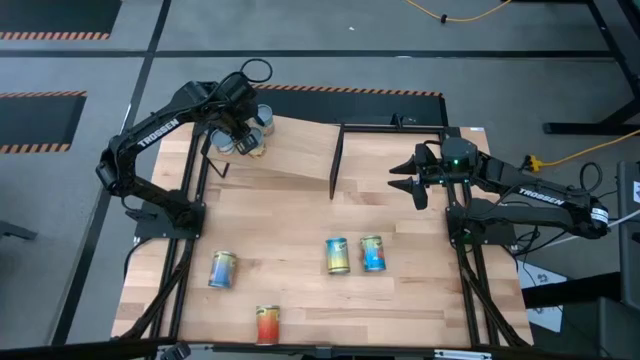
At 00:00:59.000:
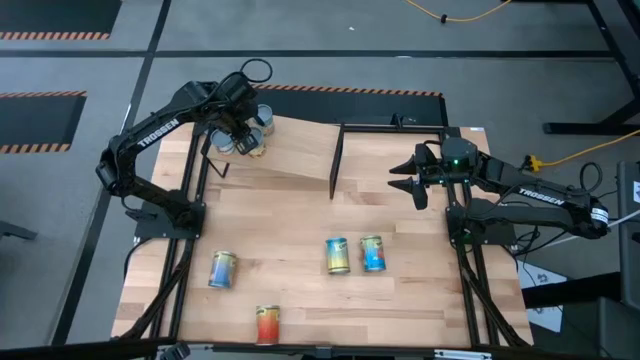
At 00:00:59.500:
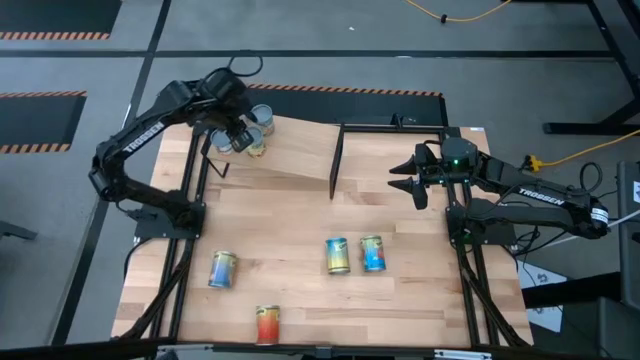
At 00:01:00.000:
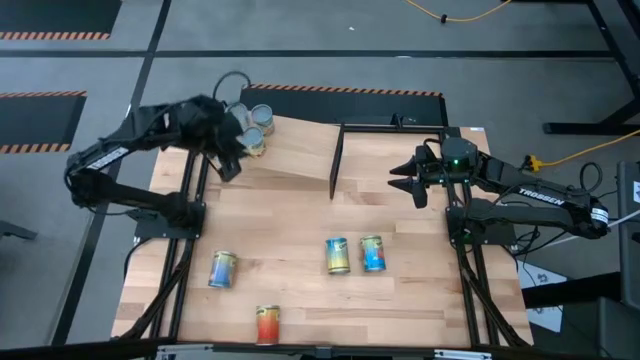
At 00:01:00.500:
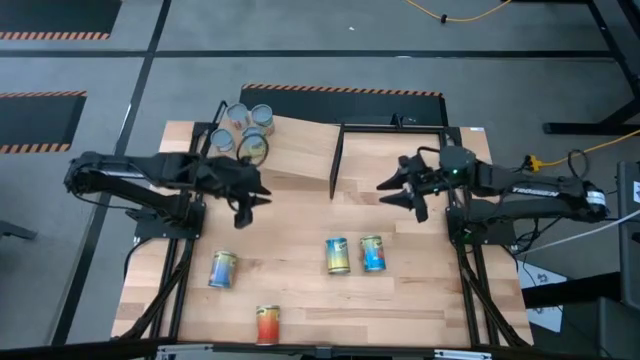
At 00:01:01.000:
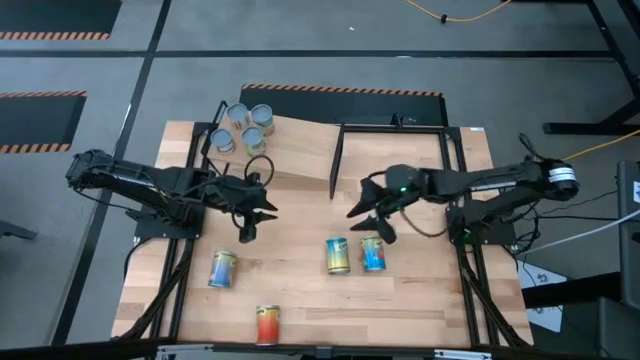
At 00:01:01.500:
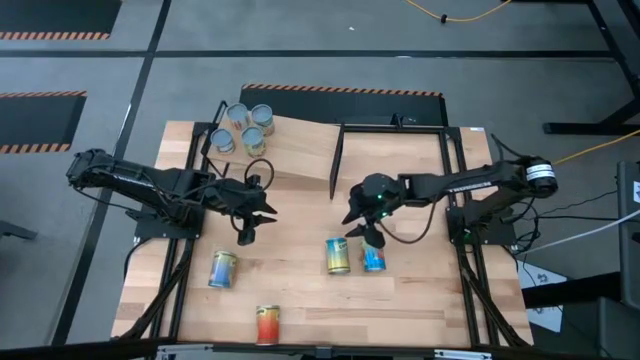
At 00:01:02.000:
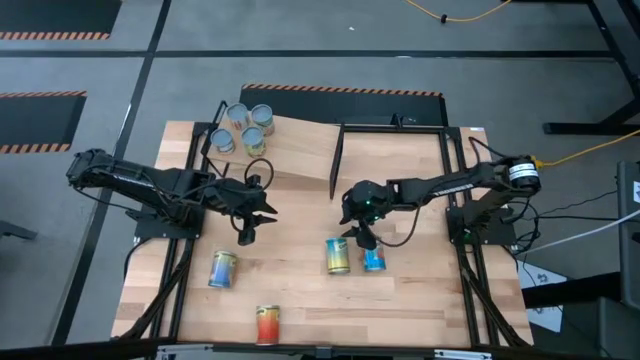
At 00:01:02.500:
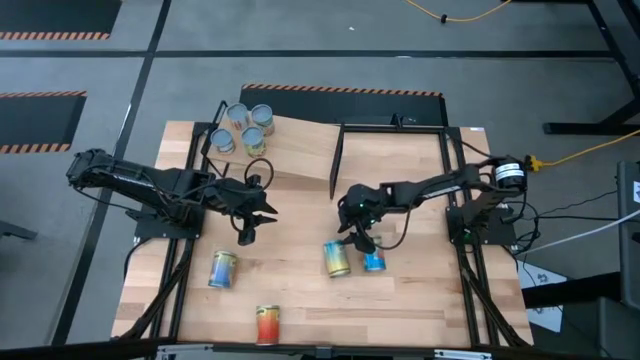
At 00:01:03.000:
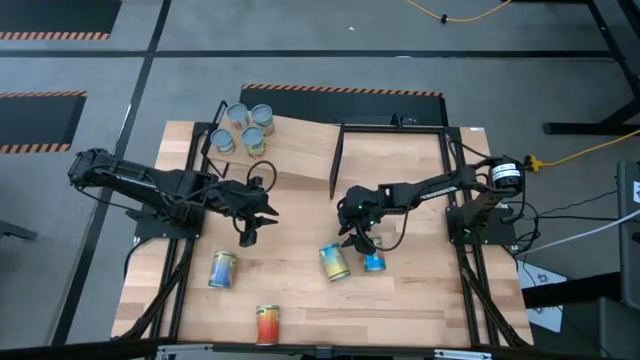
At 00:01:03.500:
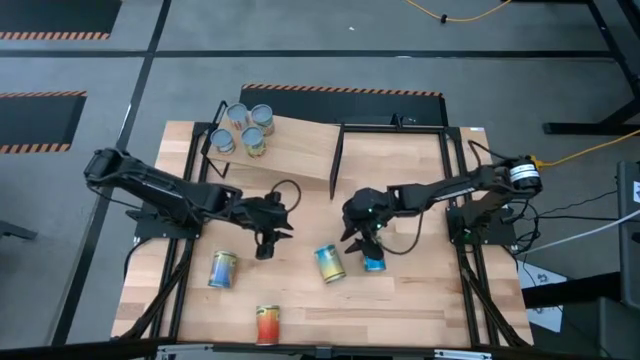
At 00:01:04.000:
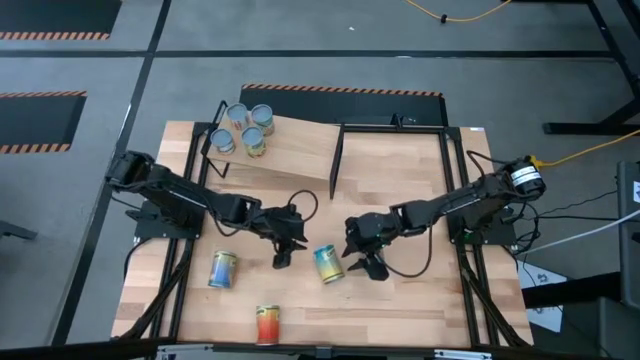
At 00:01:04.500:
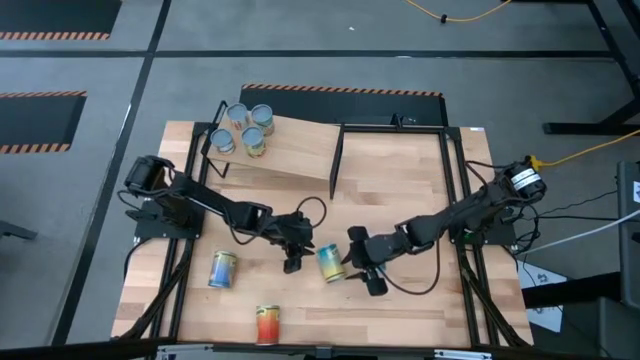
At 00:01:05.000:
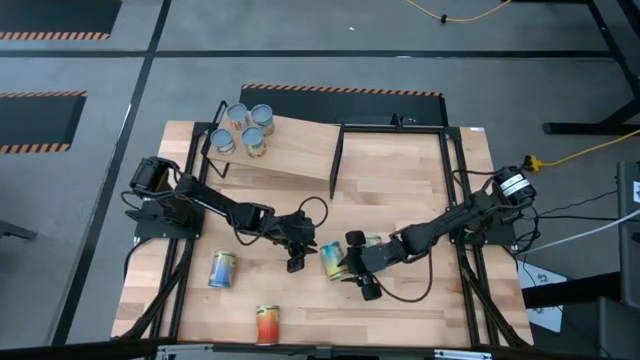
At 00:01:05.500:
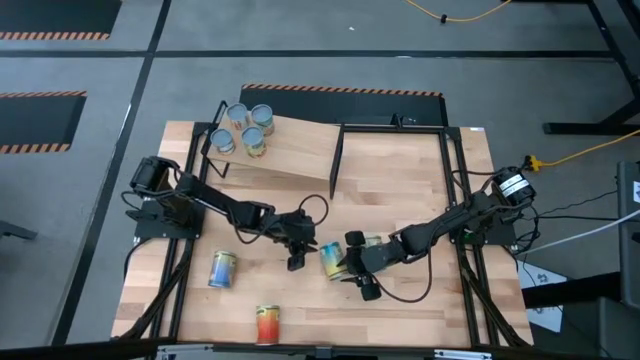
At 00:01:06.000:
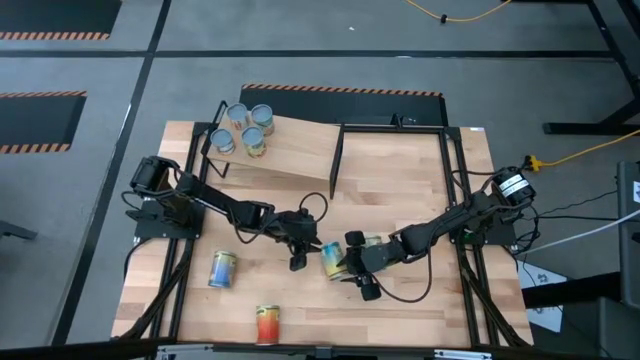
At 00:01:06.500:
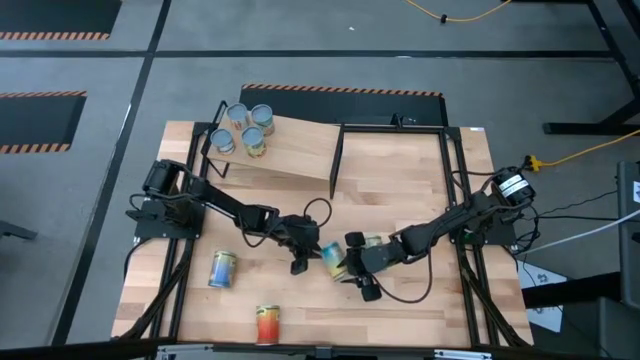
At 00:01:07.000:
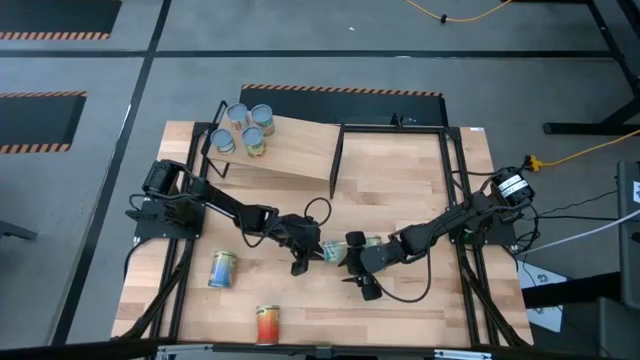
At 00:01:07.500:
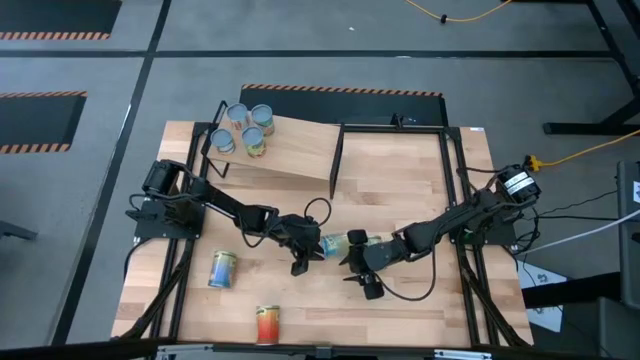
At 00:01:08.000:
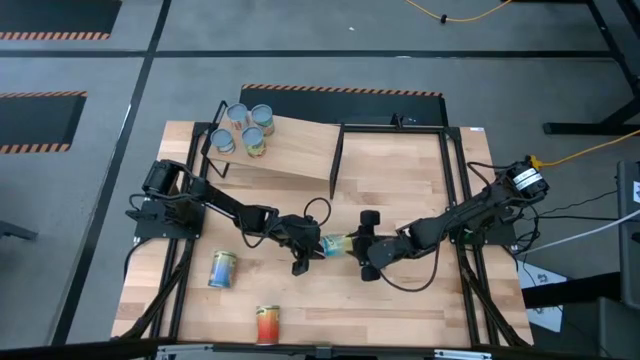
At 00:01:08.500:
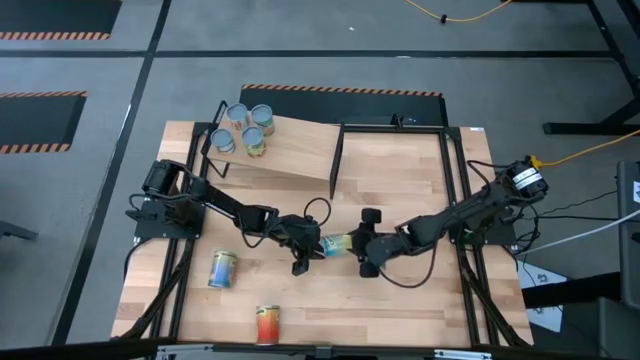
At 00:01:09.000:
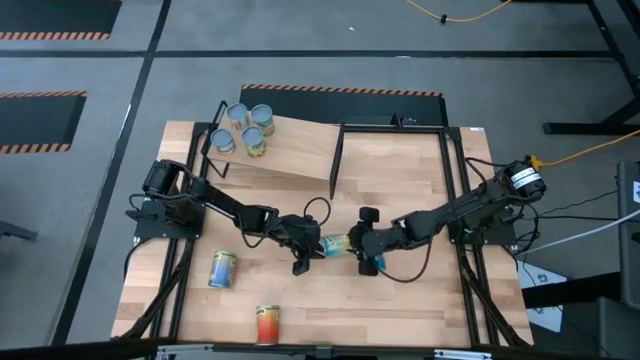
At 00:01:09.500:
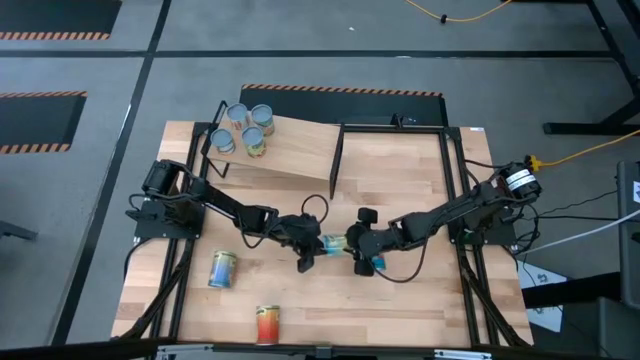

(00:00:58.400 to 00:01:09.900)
Task: Pick and place cans onto a shelf
Put the yellow canned carrot on the shelf

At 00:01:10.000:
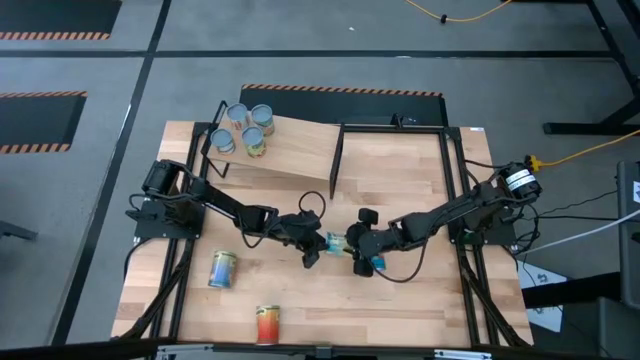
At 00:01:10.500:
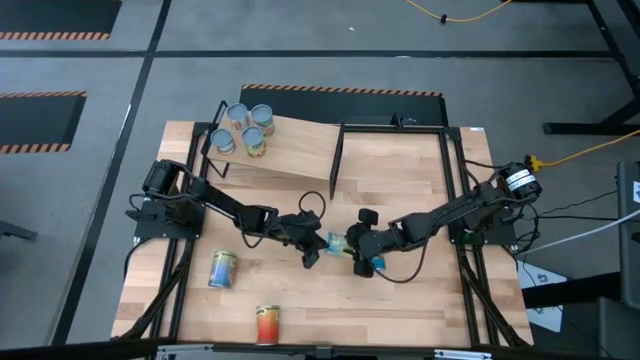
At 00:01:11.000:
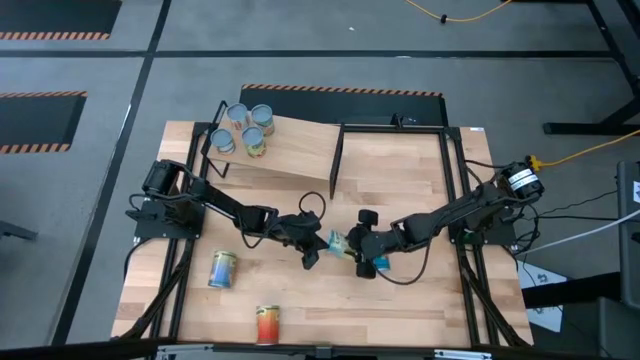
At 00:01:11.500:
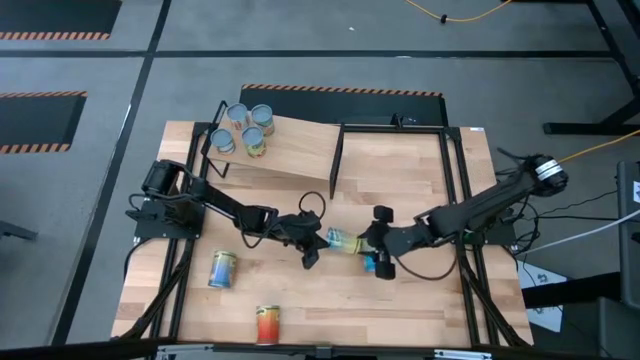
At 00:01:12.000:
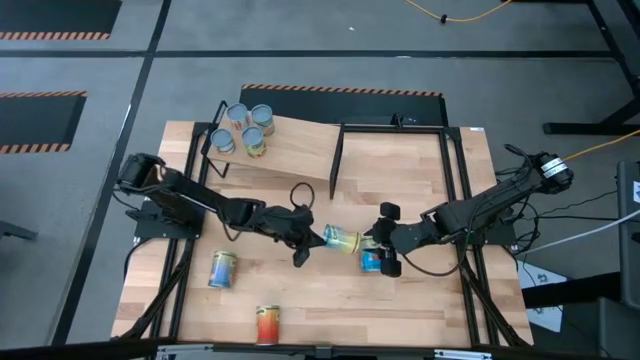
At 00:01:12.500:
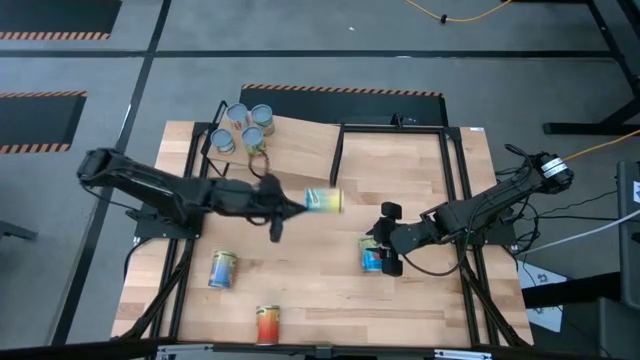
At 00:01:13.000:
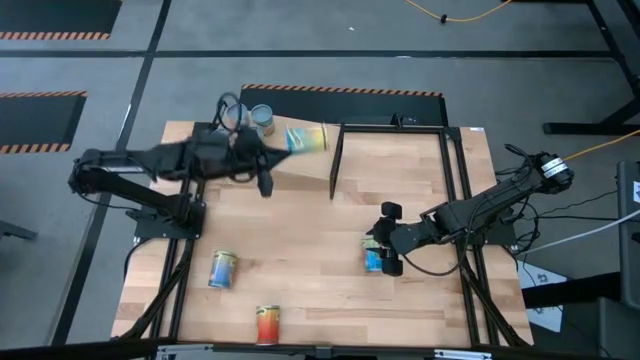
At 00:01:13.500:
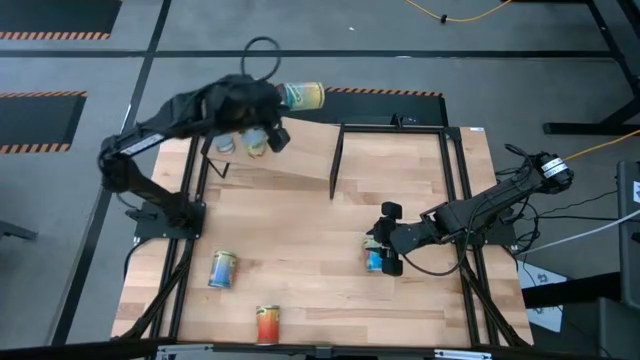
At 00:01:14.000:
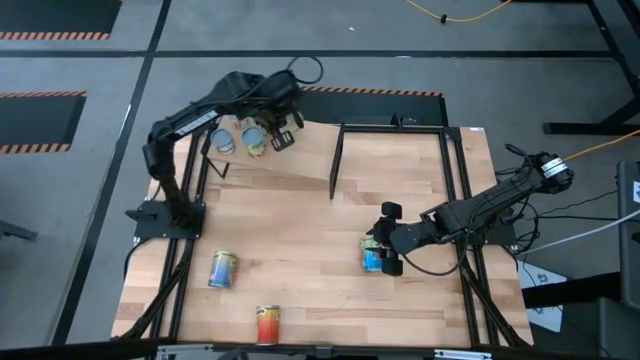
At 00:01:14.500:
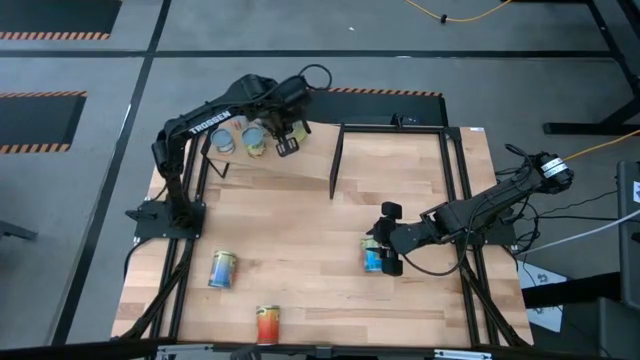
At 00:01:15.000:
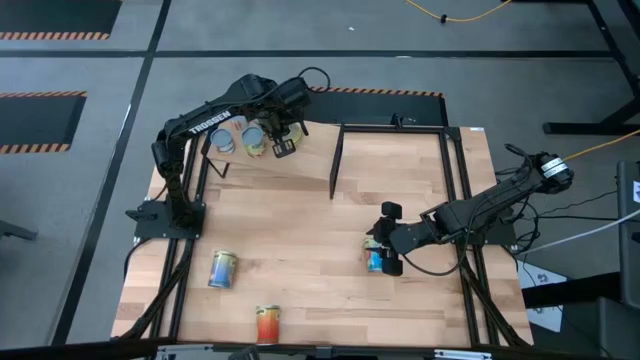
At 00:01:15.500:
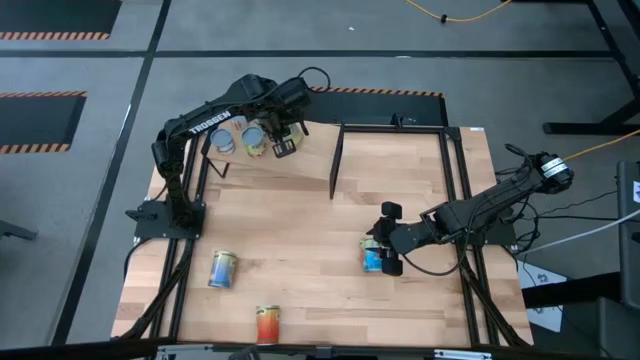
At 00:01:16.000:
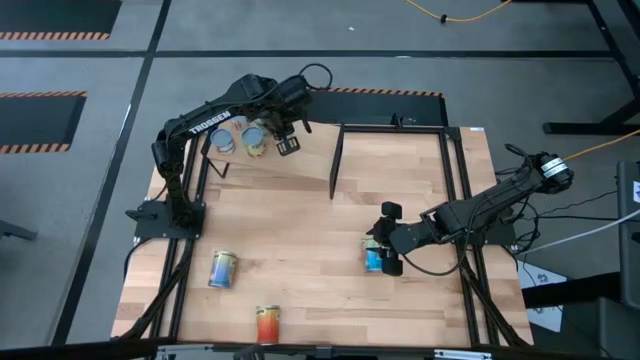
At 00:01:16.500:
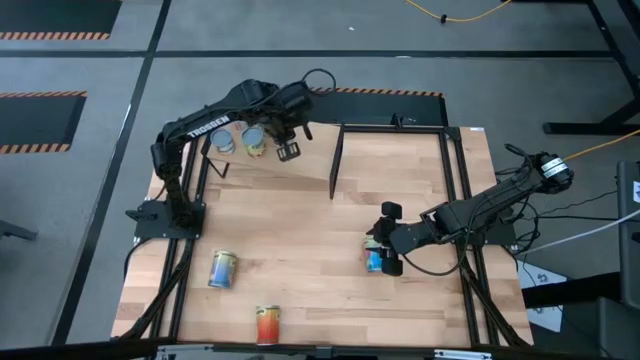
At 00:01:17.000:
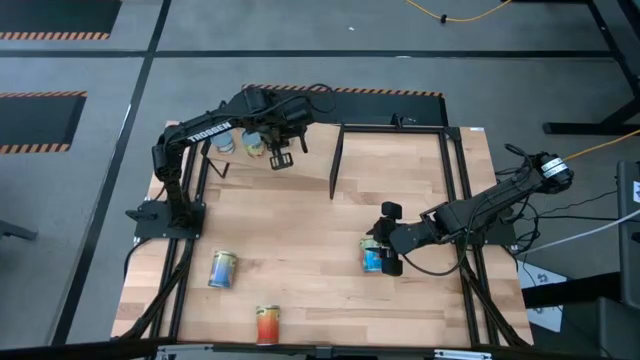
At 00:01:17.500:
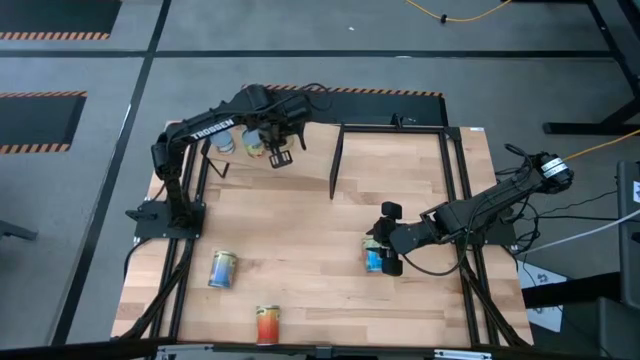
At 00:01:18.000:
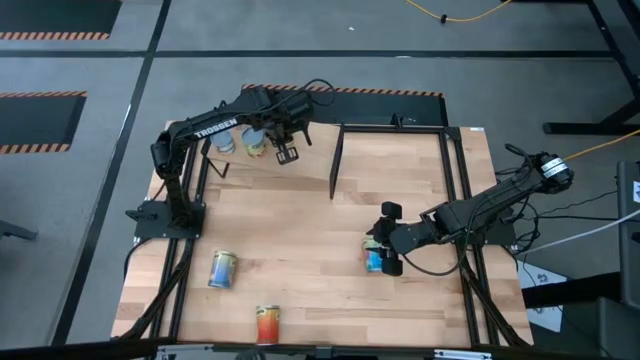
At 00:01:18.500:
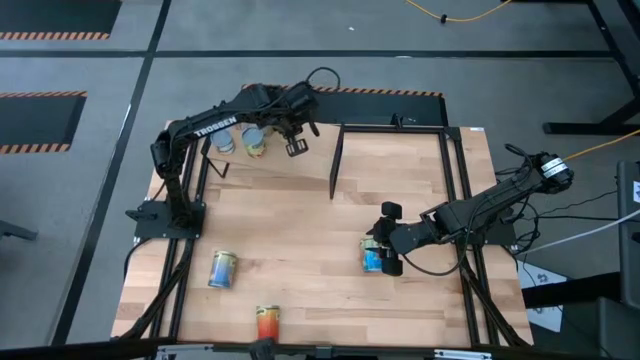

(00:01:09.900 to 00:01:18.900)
Put the yellow canned carrot on the shelf
